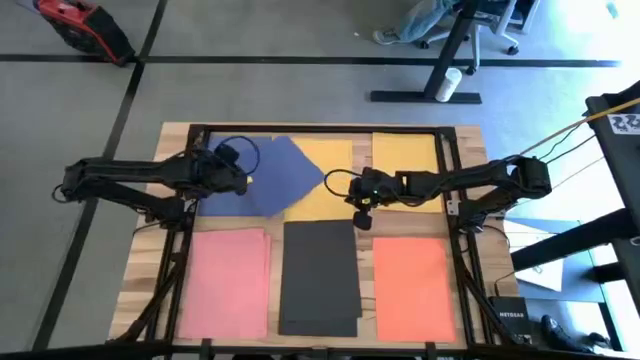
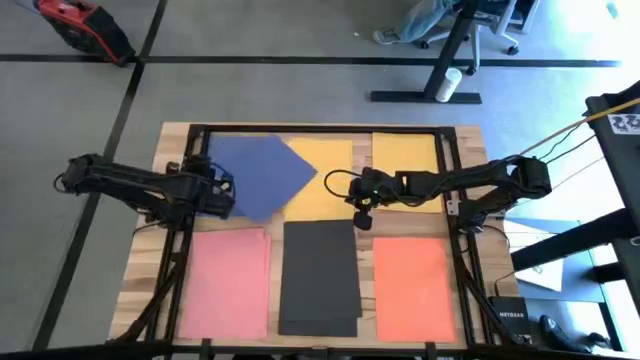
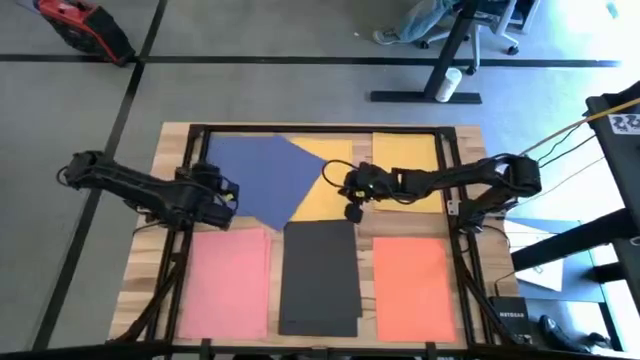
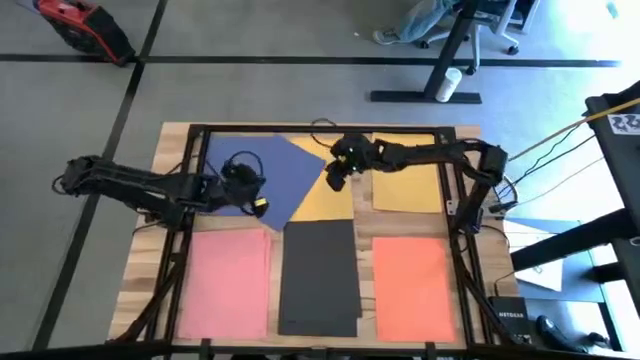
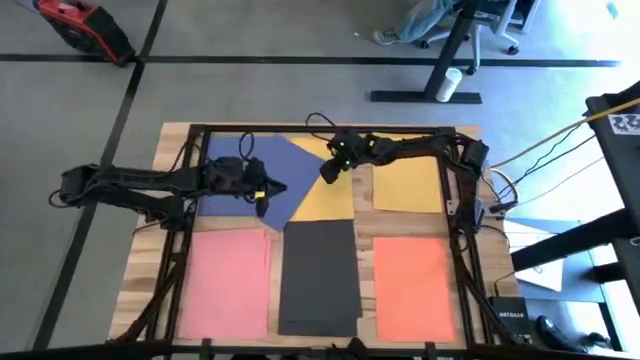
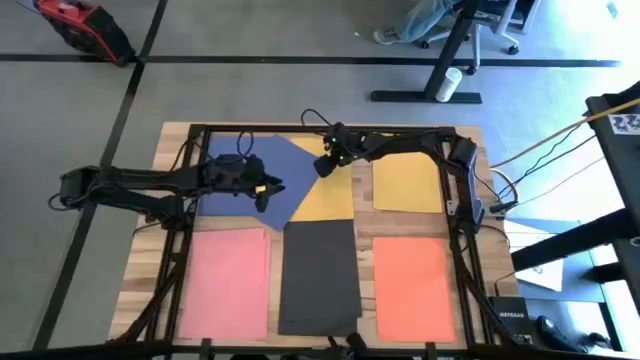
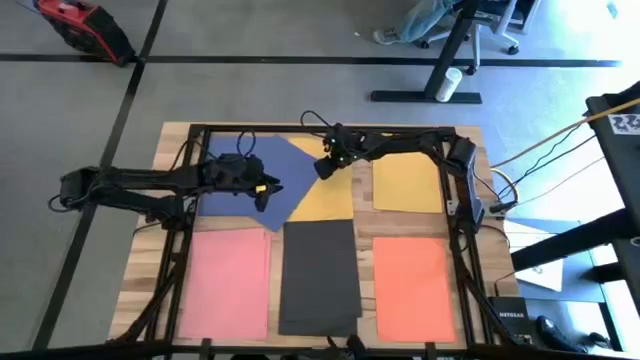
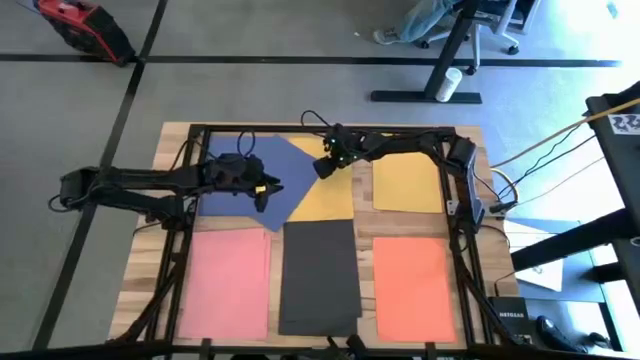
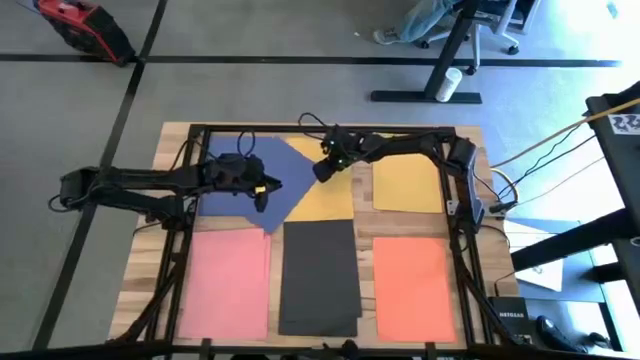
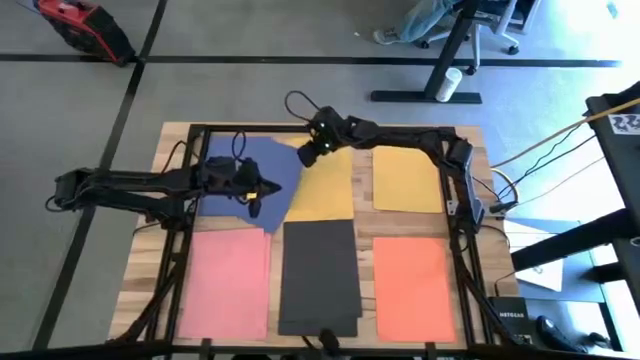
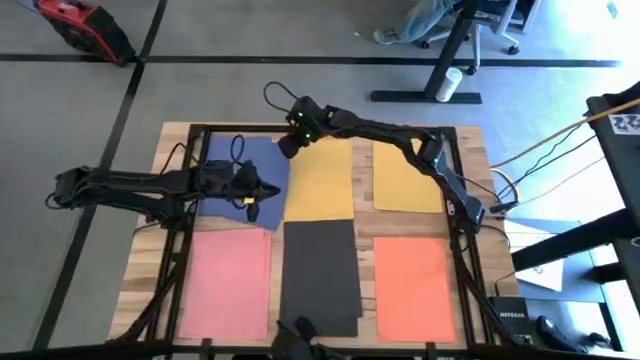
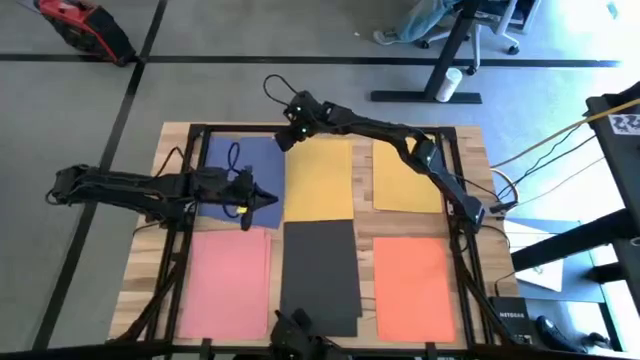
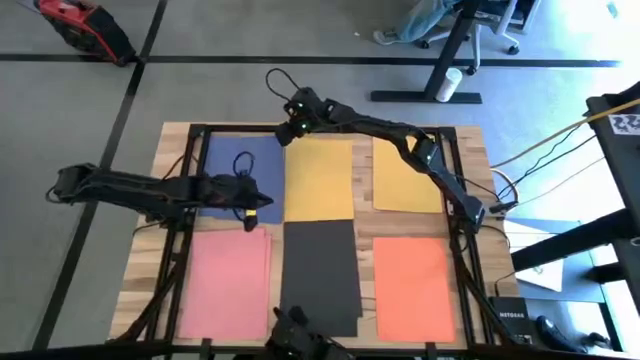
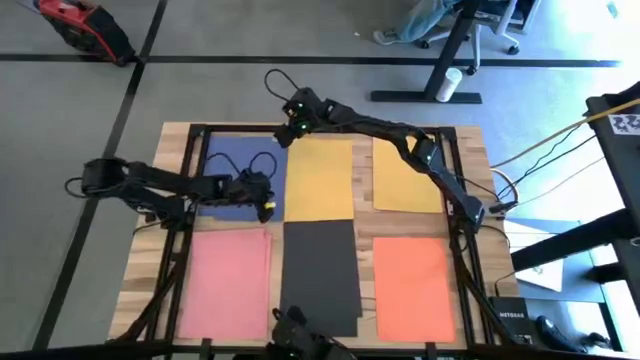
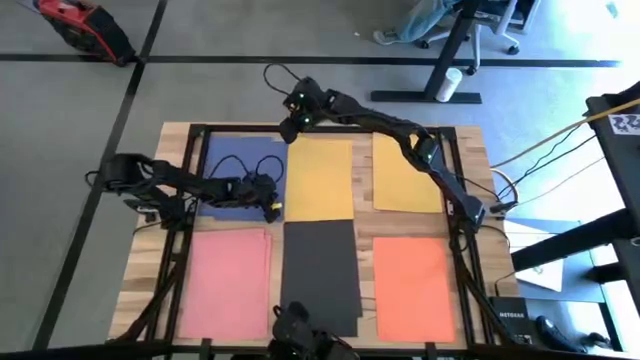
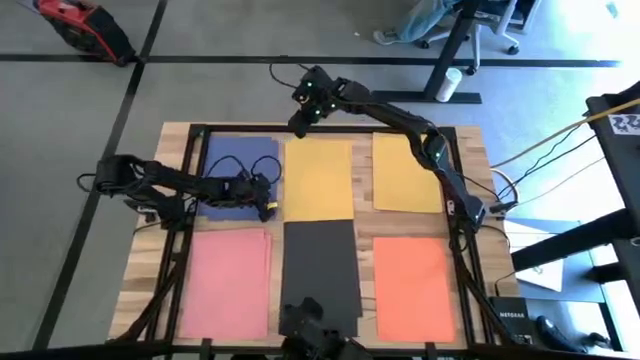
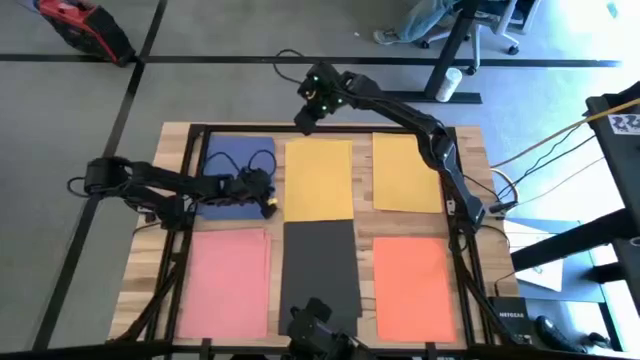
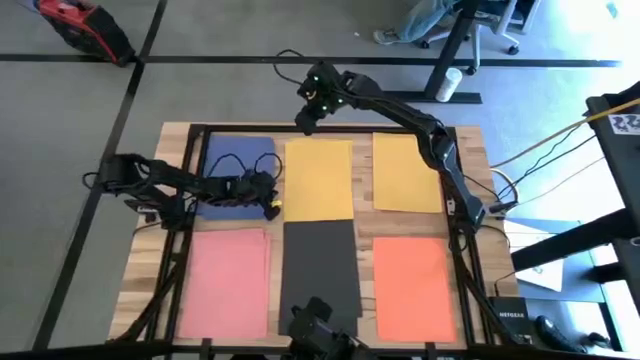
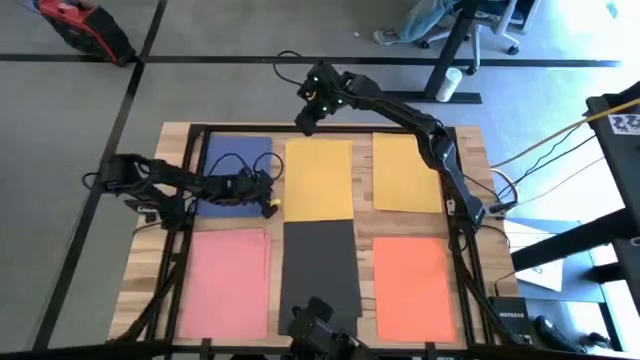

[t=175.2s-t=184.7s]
Task: Organize paper
Stack the blue paper on top of the other blue paper

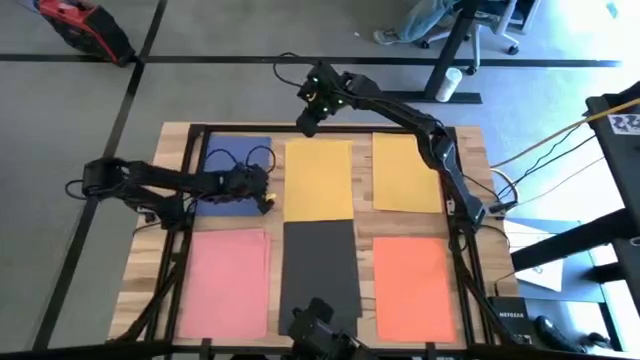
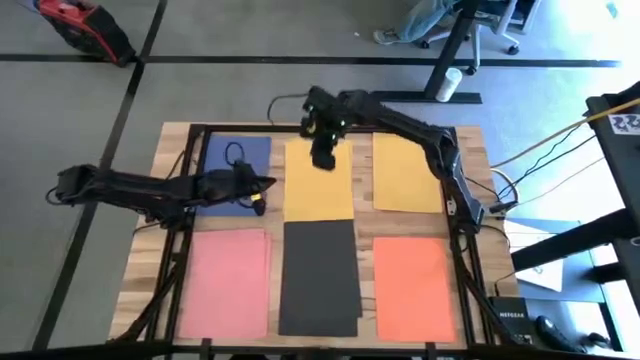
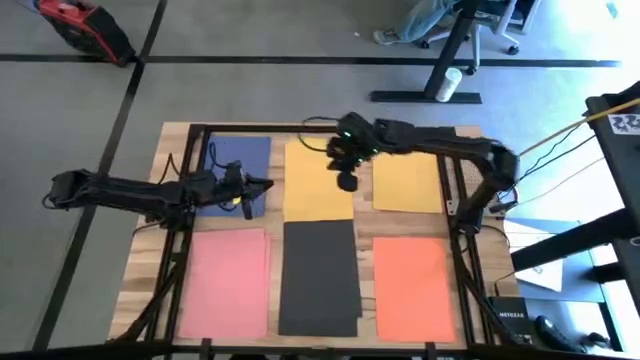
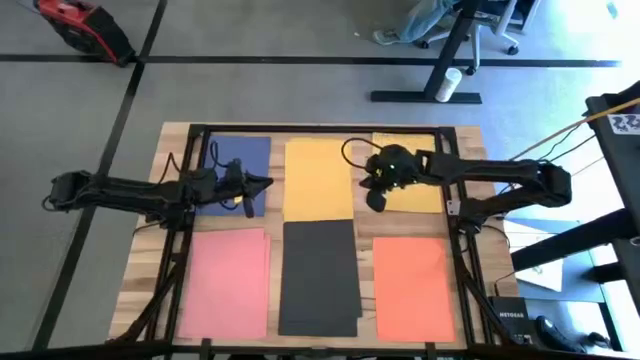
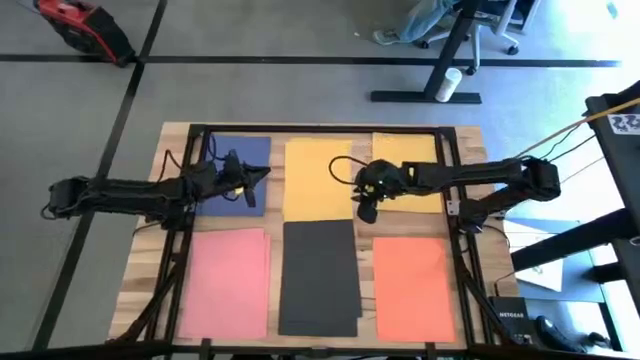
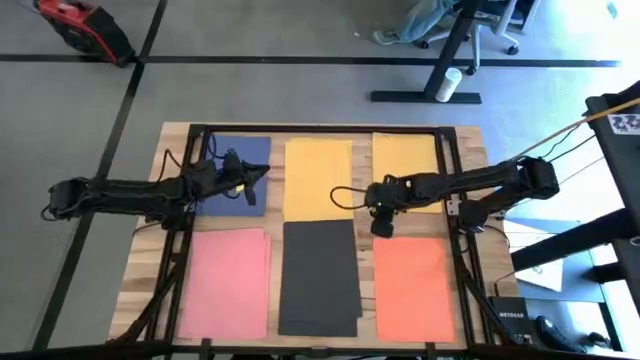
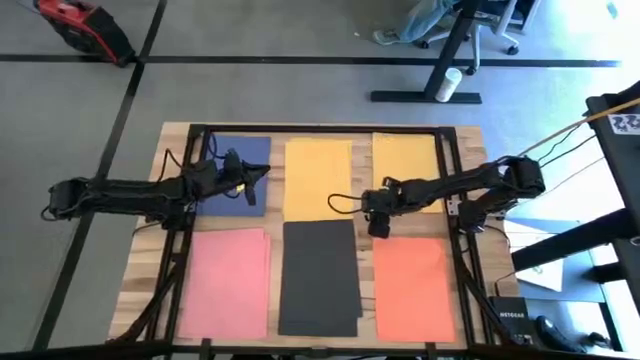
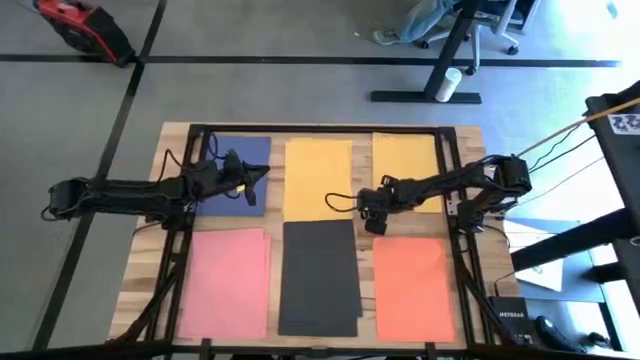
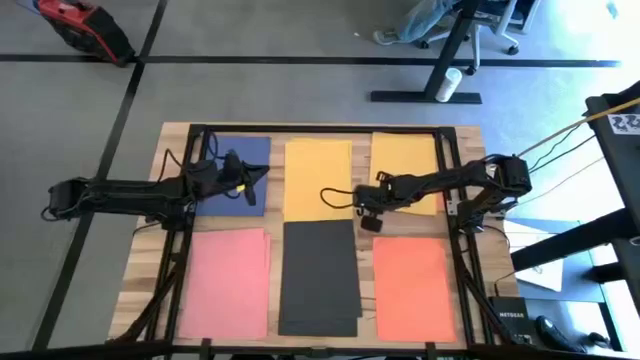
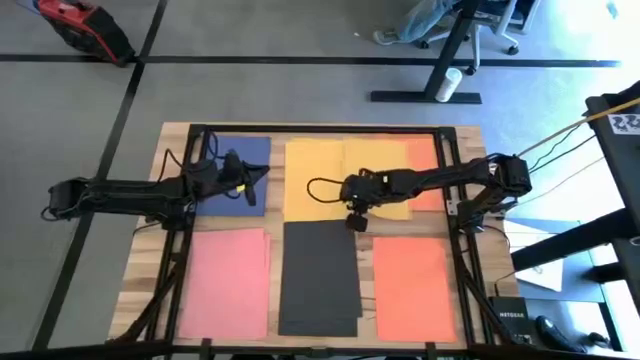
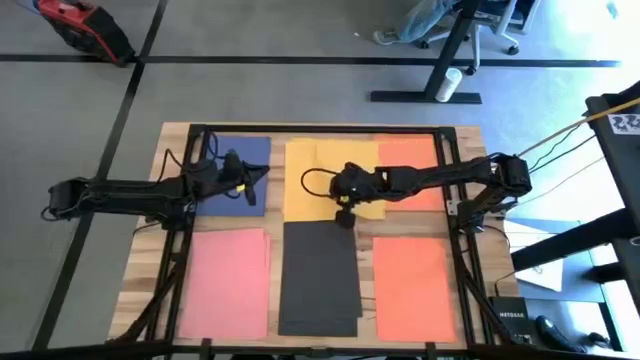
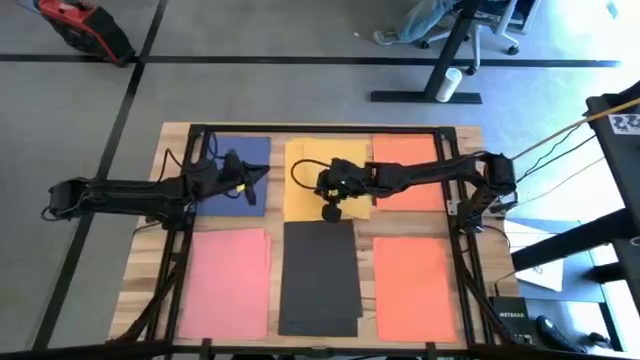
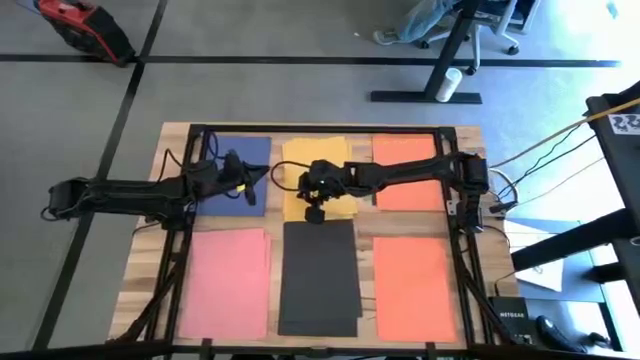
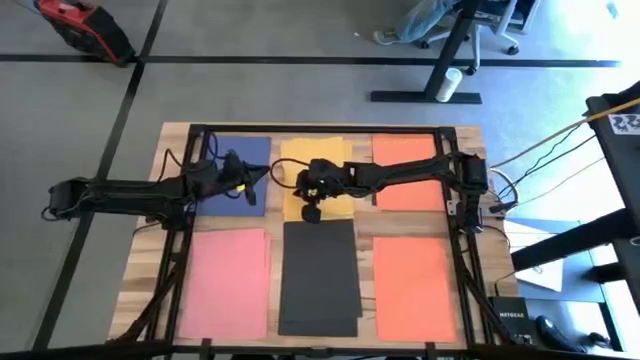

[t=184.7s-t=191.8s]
Stack the yellow paper on top of the other yellow paper

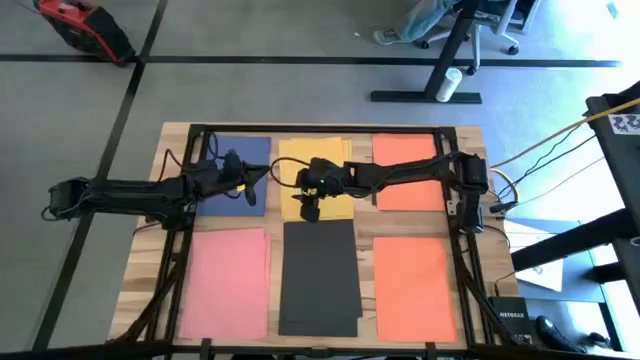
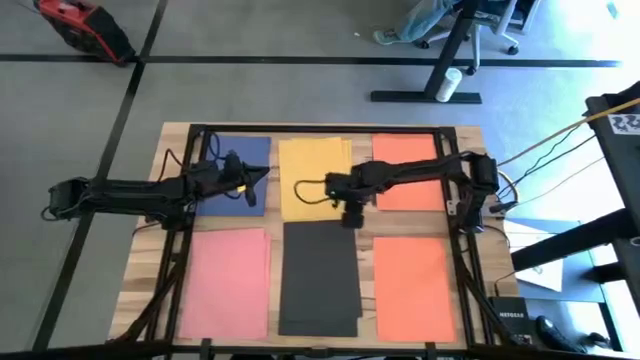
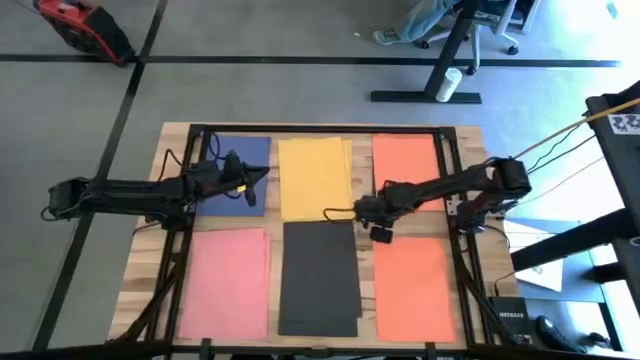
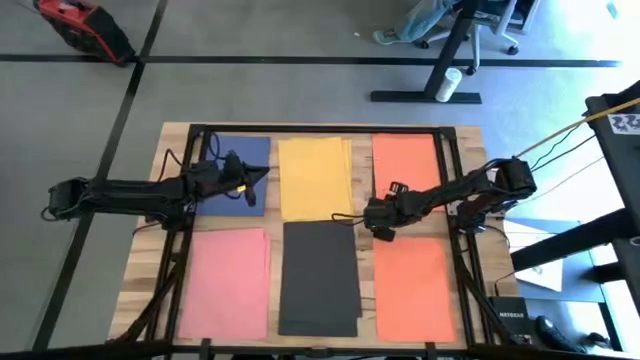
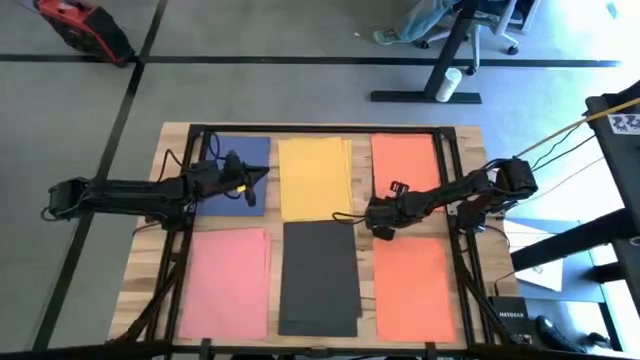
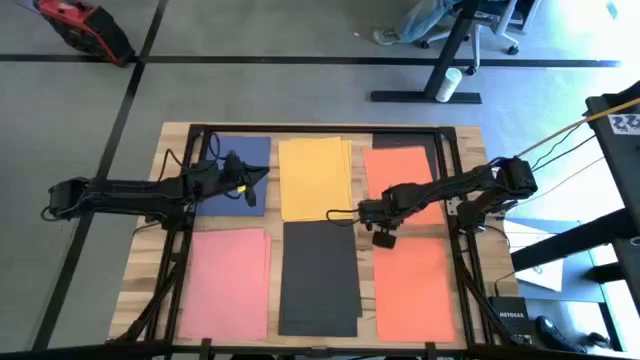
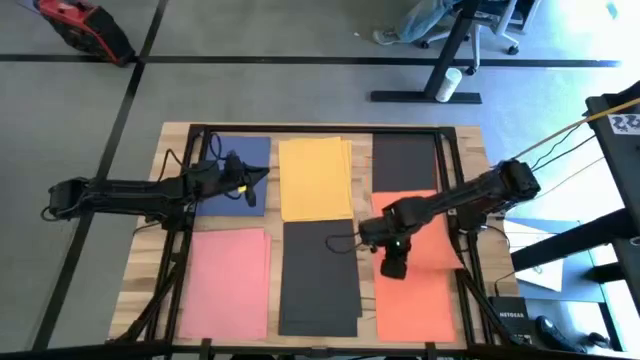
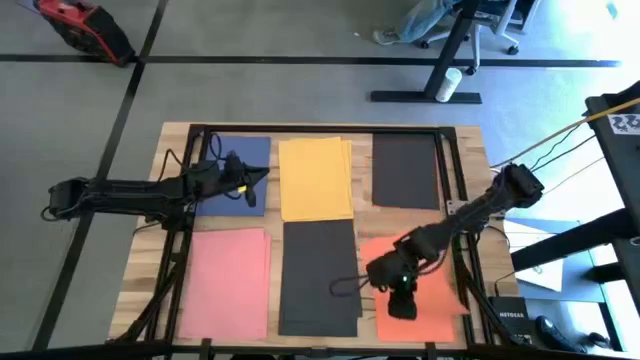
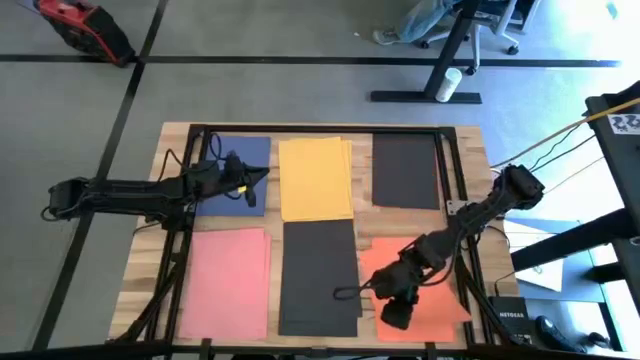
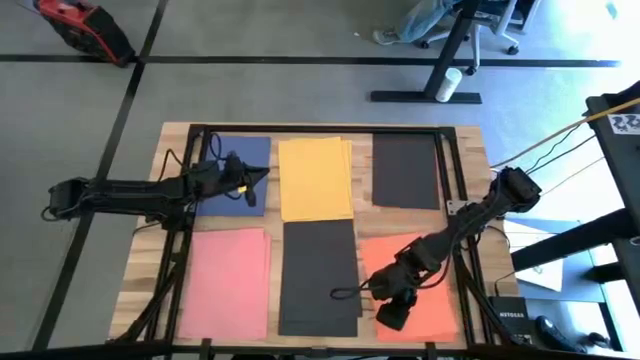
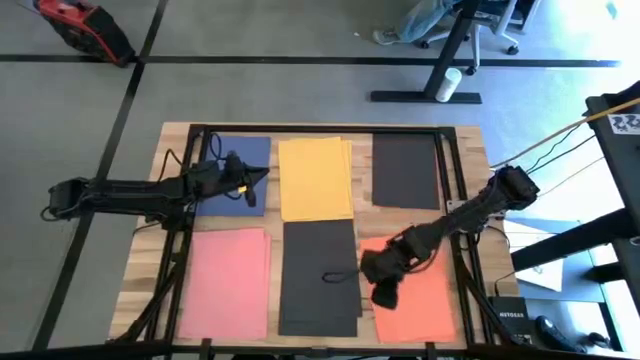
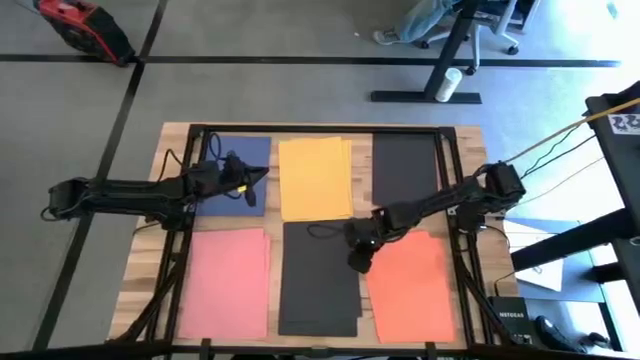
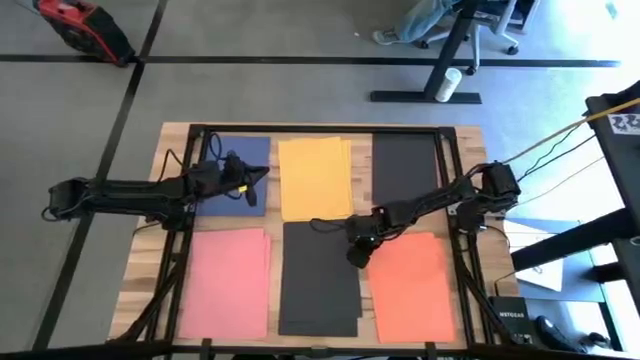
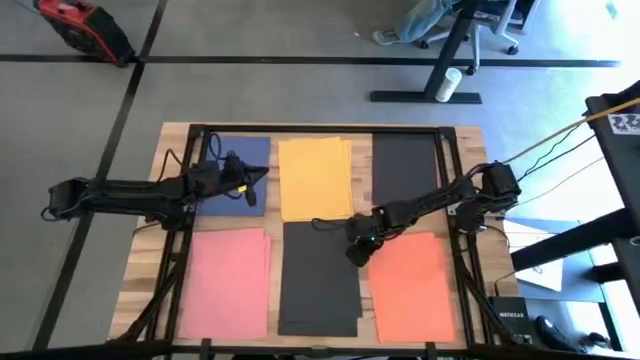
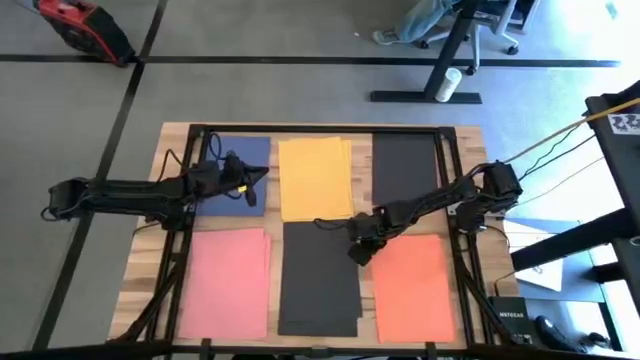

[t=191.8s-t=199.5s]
Stack the orange paper on top of the other orange paper
